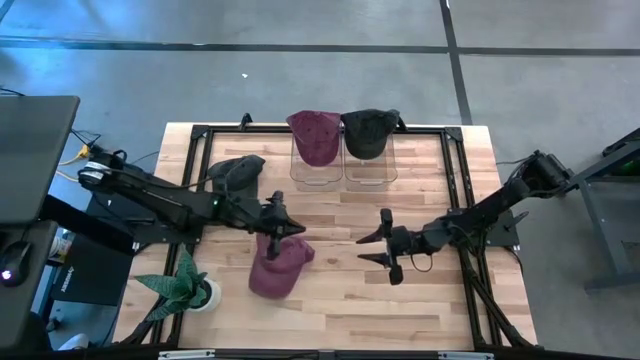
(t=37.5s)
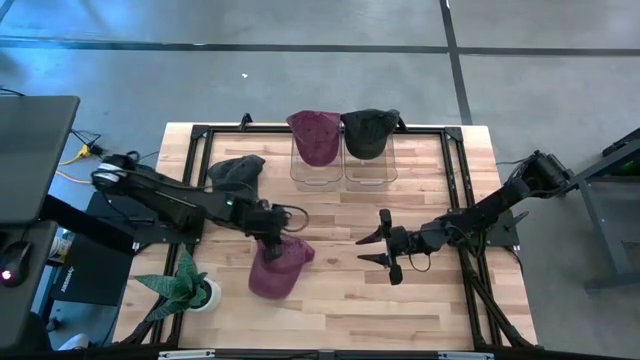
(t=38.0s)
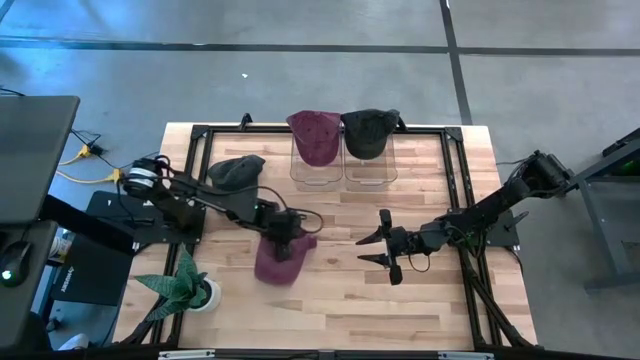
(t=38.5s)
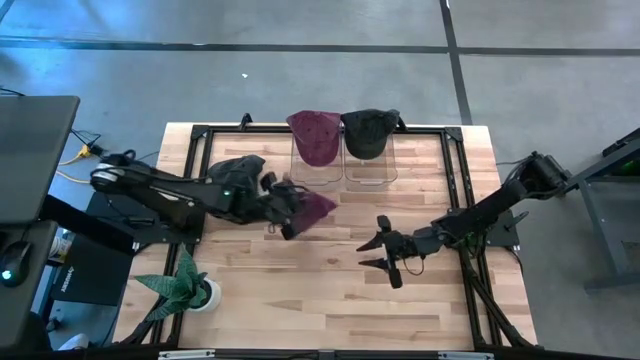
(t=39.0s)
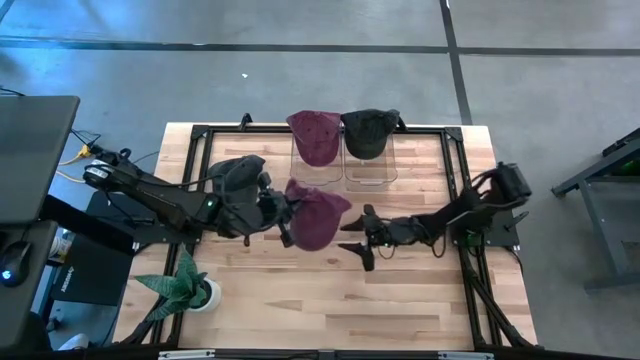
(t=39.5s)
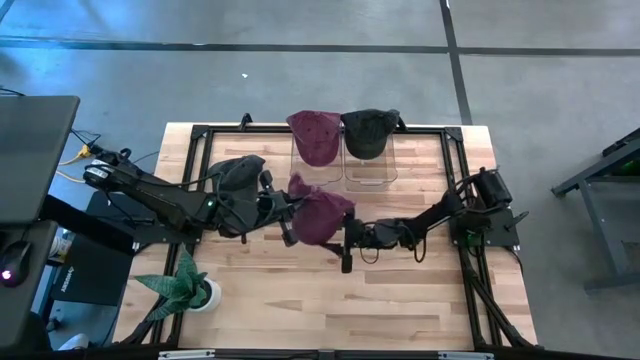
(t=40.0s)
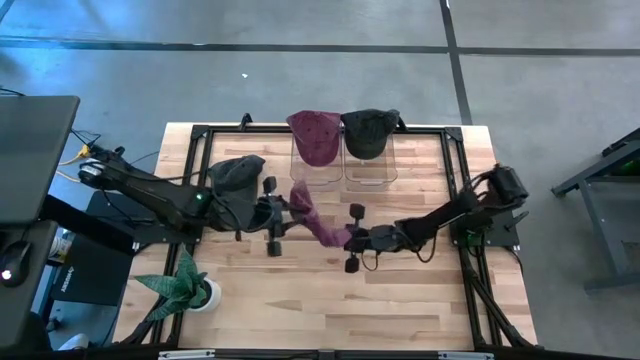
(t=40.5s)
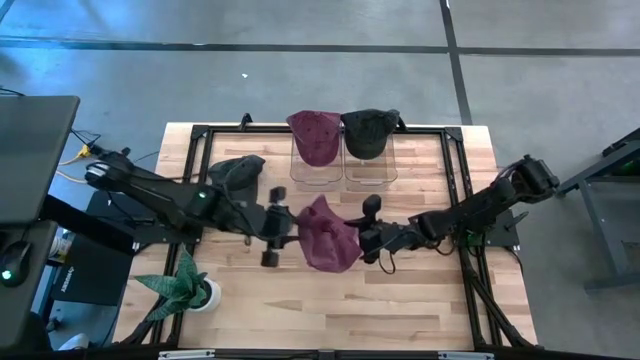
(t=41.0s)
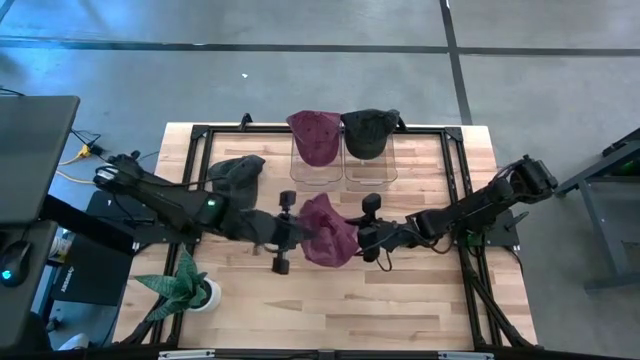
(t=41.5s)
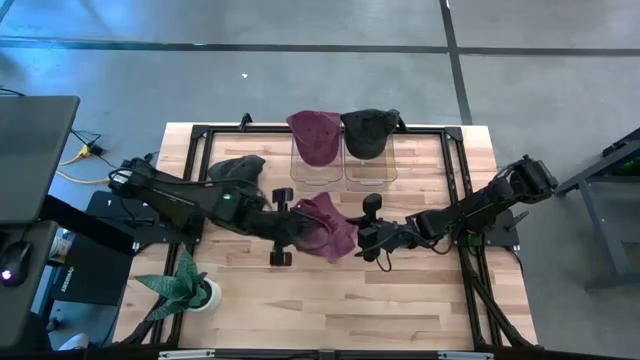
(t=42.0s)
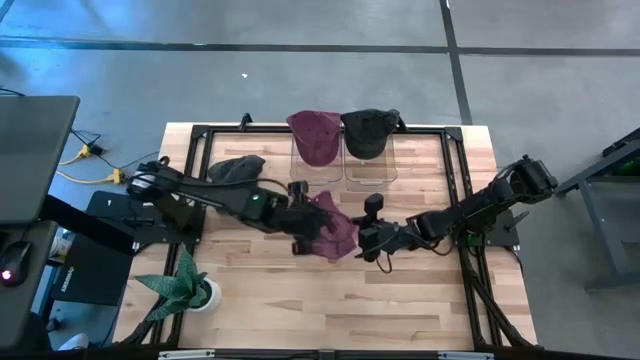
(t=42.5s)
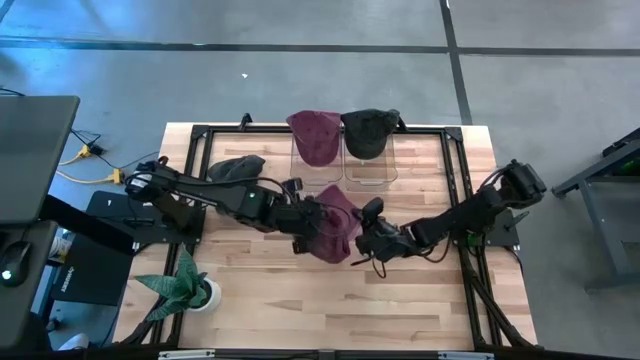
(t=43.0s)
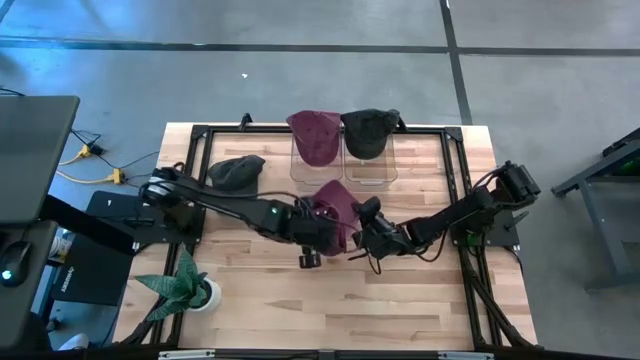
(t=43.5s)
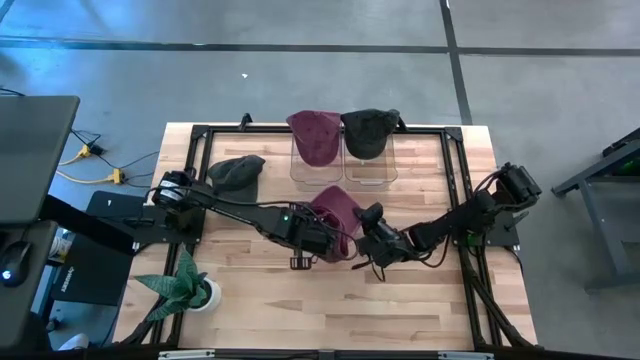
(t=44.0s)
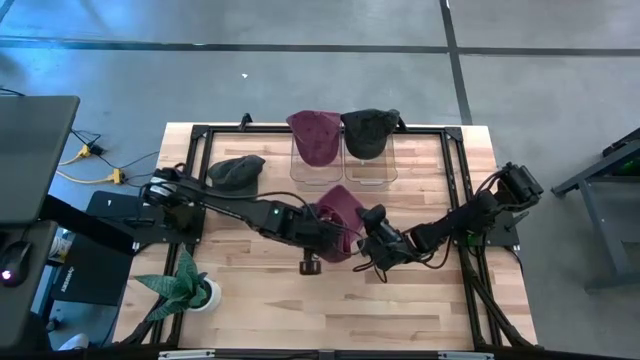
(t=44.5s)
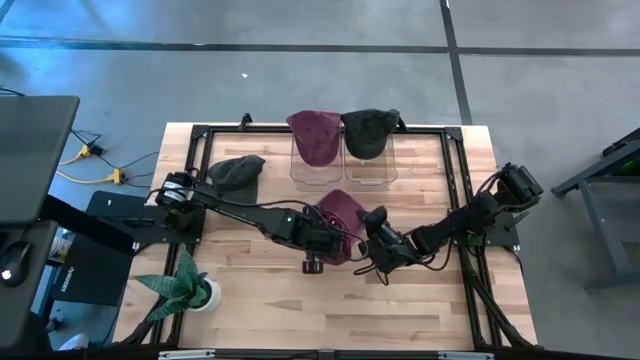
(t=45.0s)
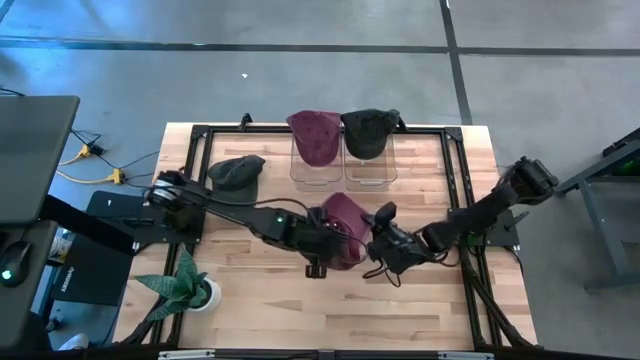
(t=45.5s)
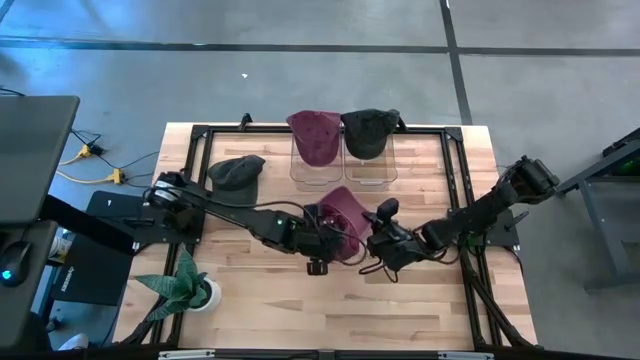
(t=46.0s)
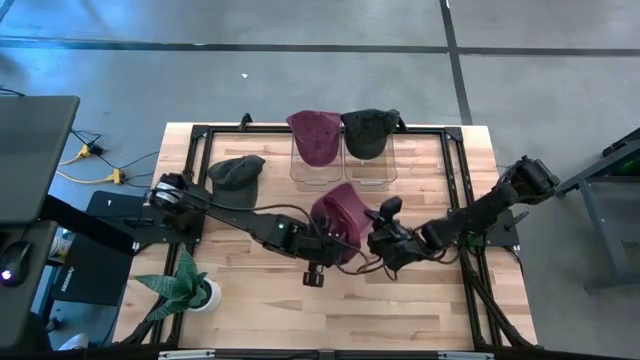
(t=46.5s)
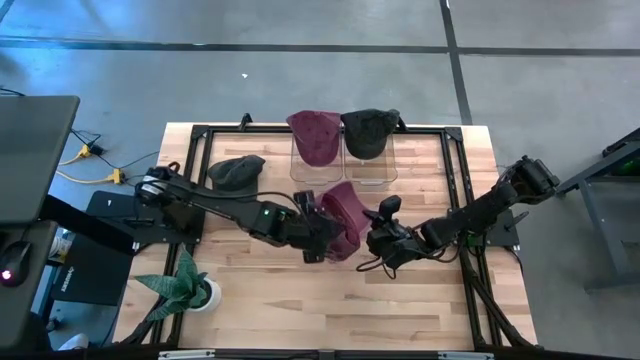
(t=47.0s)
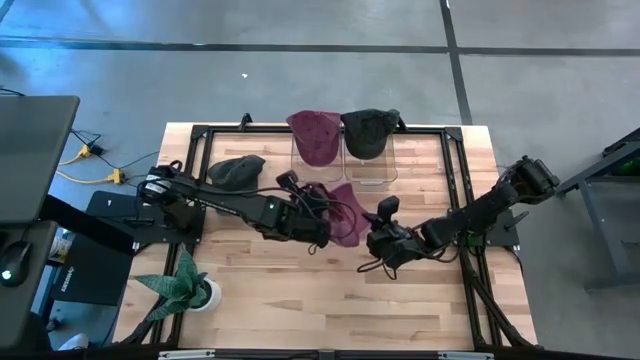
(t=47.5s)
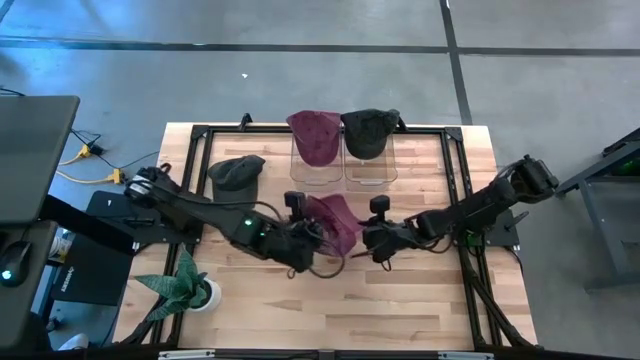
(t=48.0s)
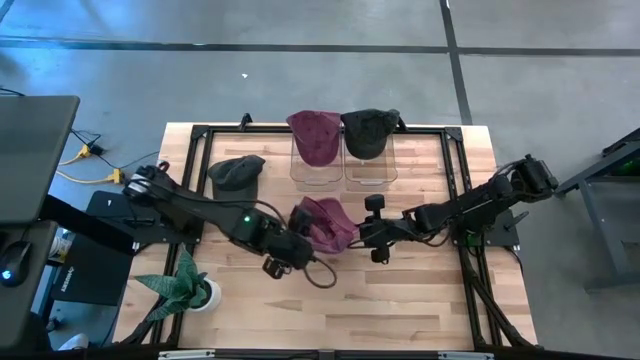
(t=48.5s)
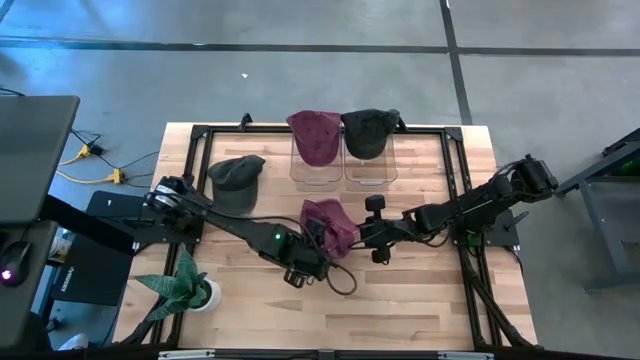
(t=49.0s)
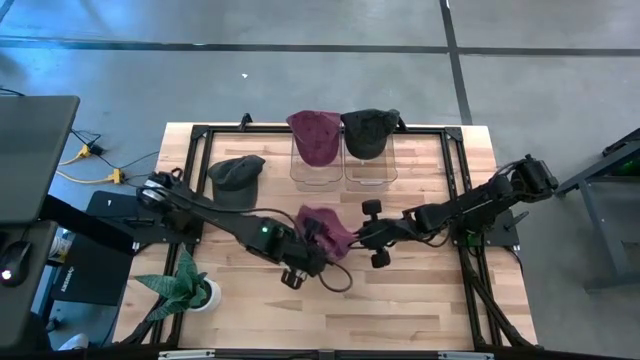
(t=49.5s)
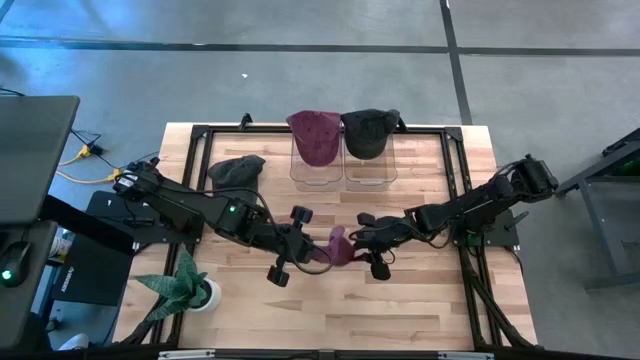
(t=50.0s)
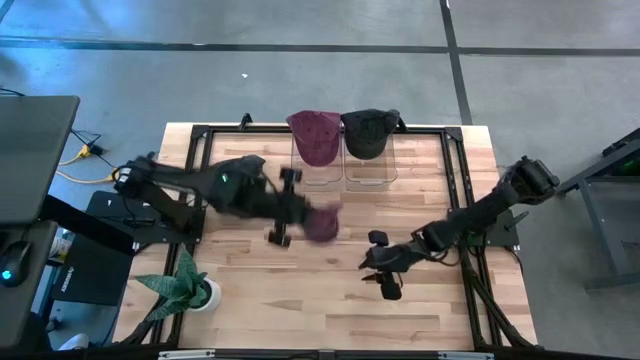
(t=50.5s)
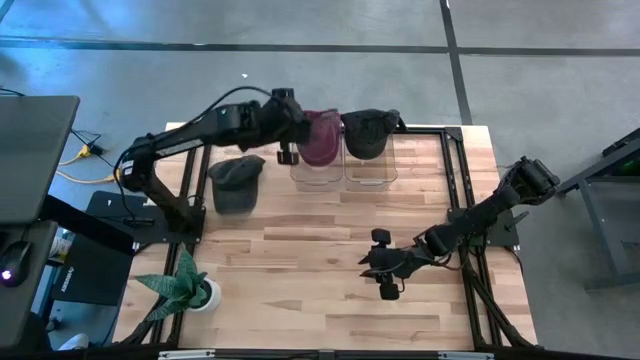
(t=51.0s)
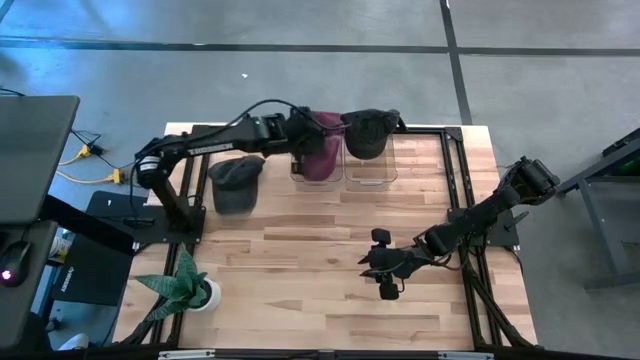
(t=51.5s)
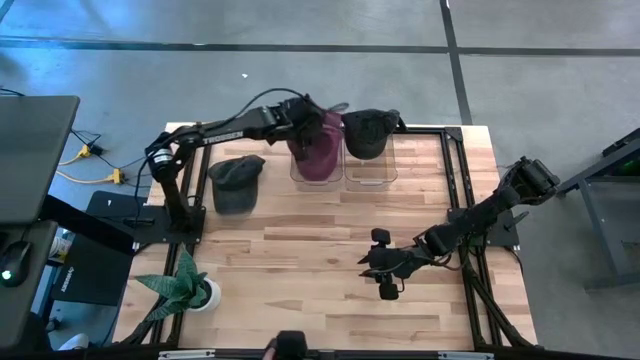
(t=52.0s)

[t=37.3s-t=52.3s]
Task: Pick & Place hat
Put the red cap into the left transparent bin

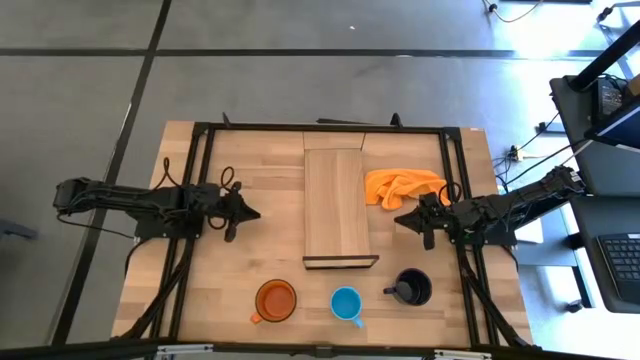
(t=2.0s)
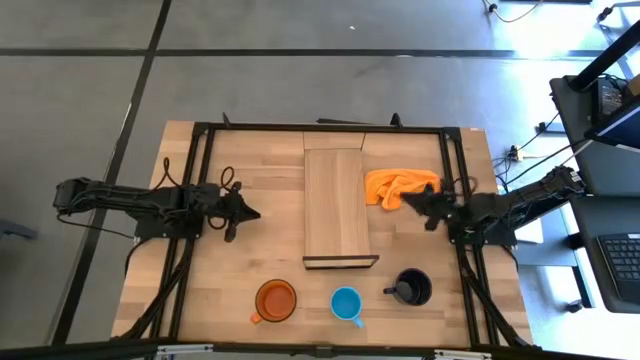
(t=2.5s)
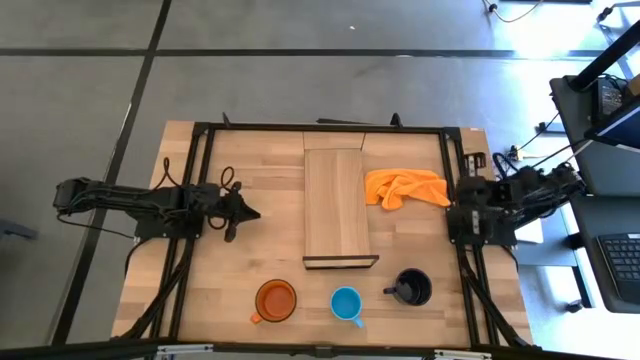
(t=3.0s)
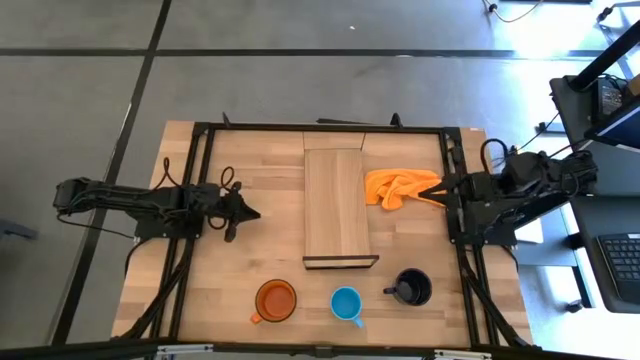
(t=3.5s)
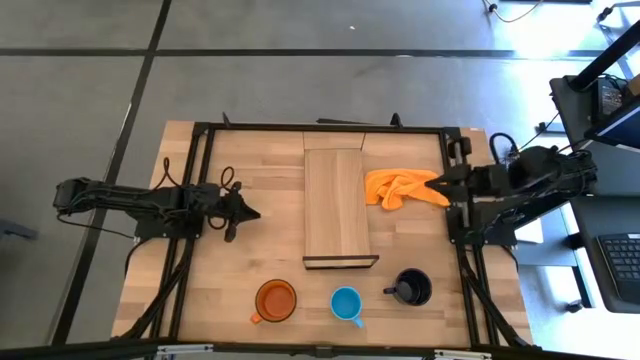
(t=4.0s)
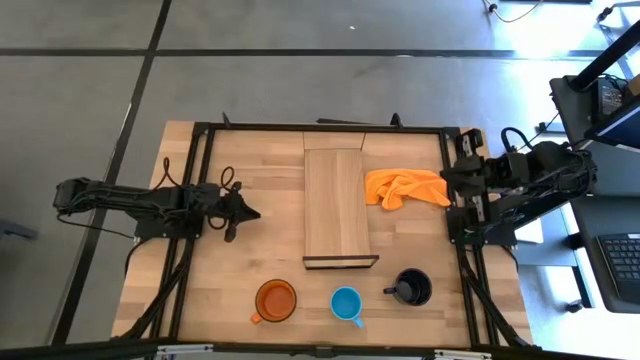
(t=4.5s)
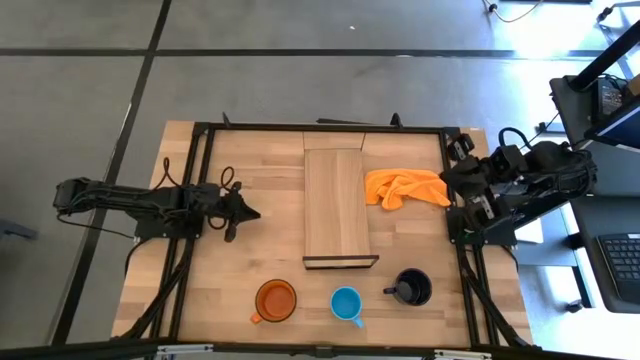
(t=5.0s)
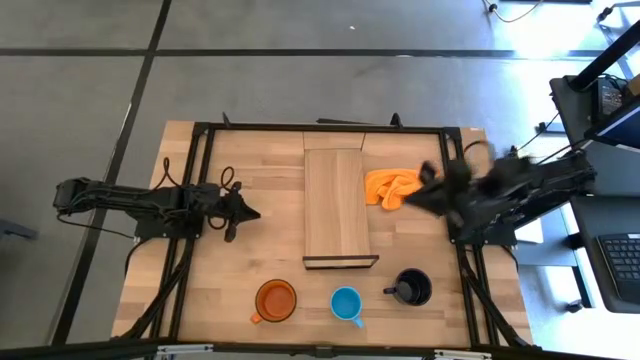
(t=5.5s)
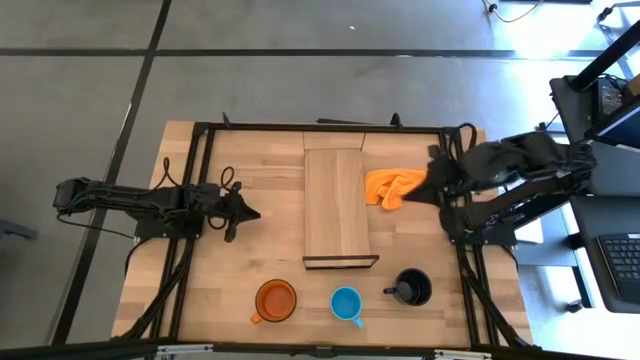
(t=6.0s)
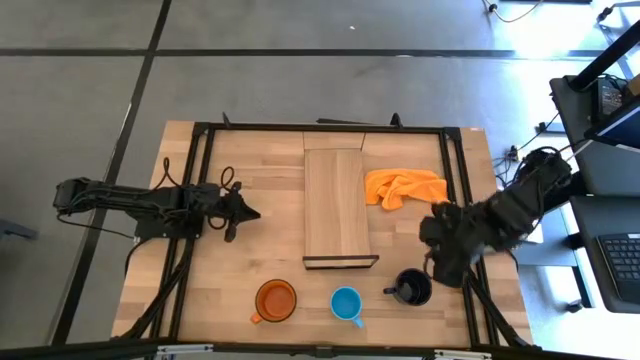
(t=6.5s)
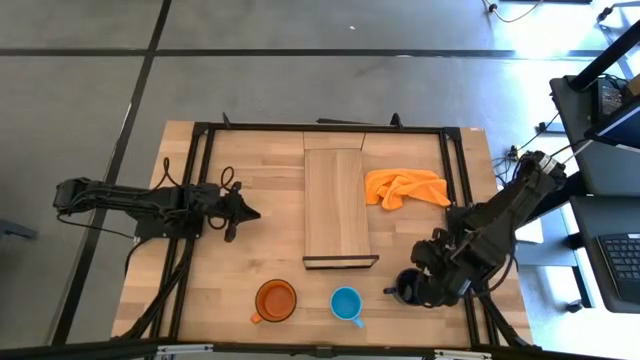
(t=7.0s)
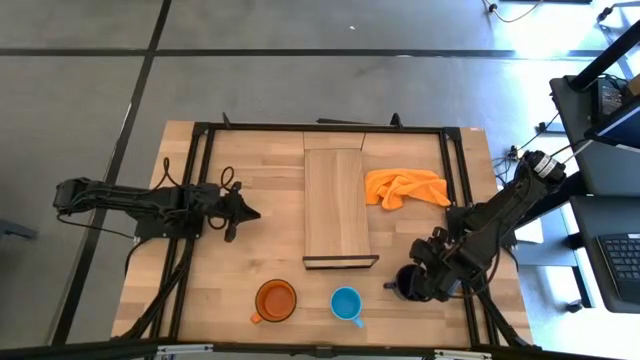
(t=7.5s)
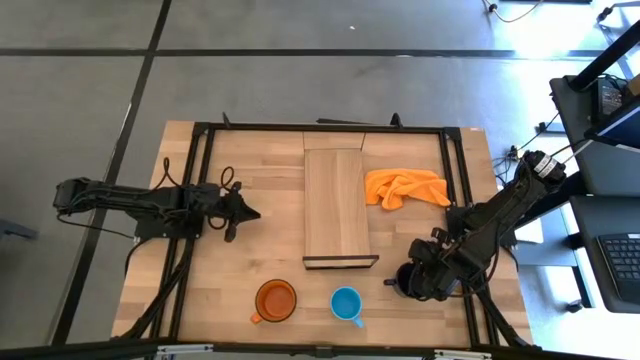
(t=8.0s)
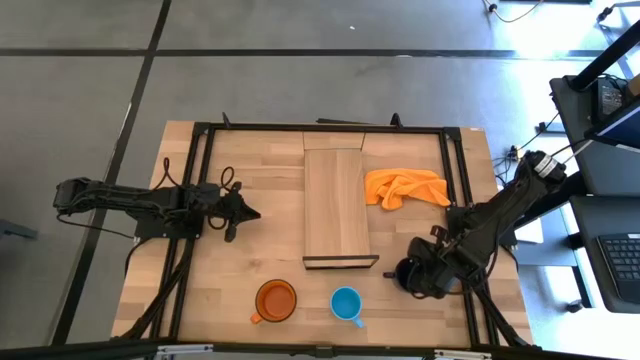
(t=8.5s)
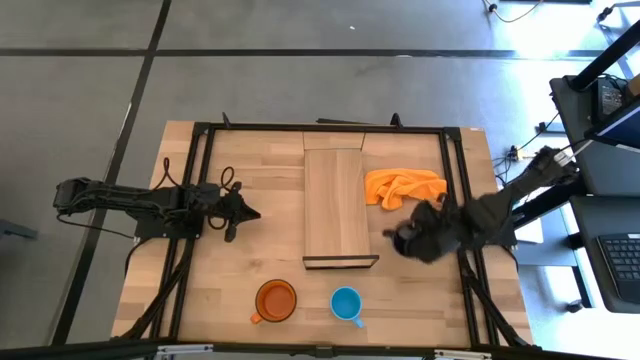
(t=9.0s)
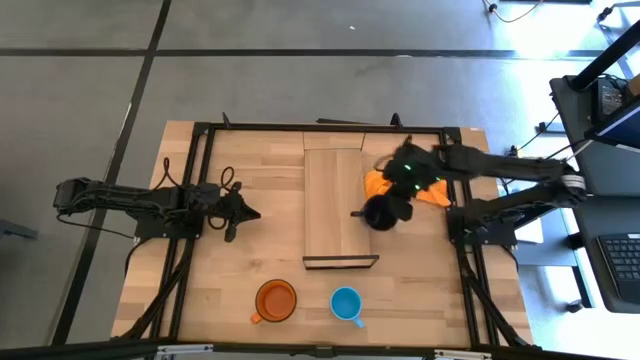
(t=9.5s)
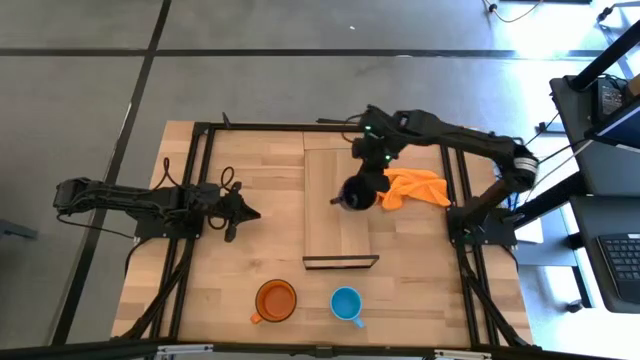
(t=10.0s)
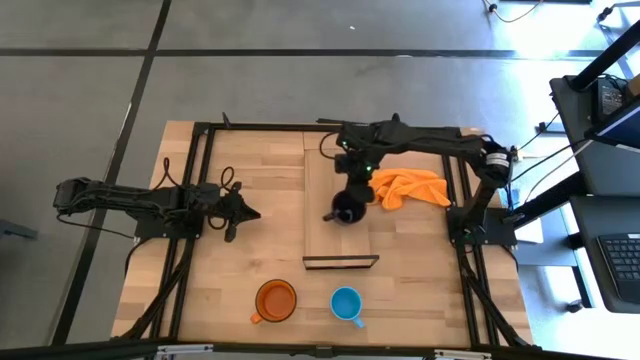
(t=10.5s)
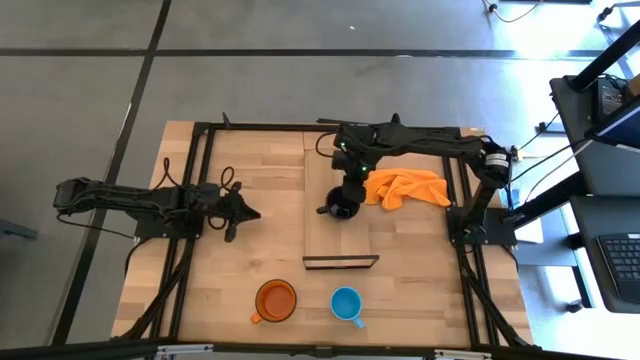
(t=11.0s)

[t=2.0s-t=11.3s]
Task: Stack small to large cups/mugs on shelf
Put the dark blue mug on the shelf
